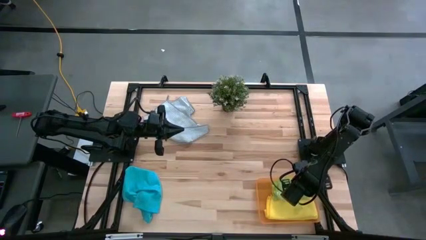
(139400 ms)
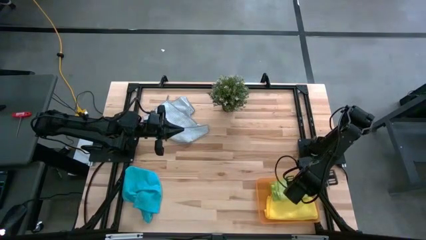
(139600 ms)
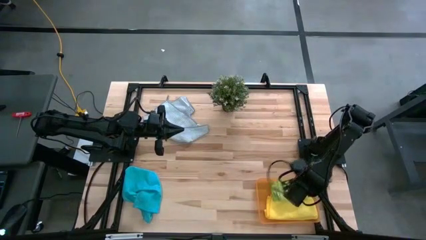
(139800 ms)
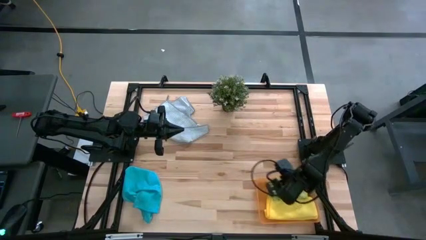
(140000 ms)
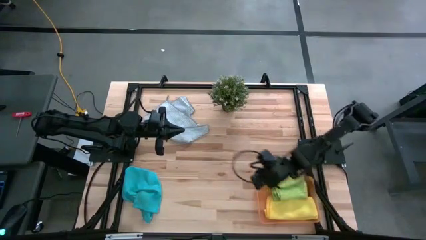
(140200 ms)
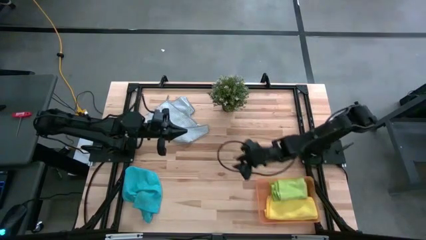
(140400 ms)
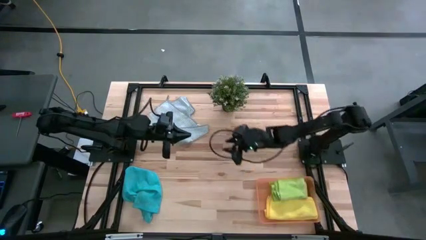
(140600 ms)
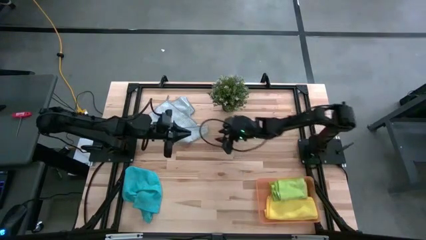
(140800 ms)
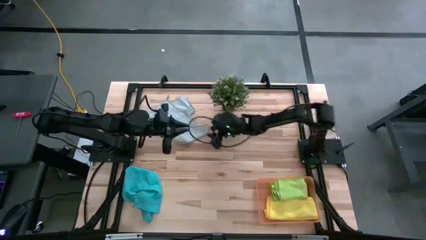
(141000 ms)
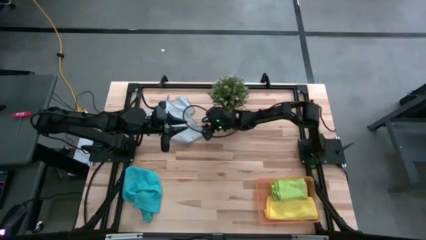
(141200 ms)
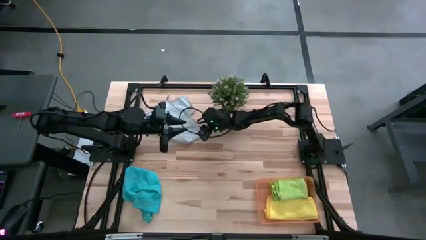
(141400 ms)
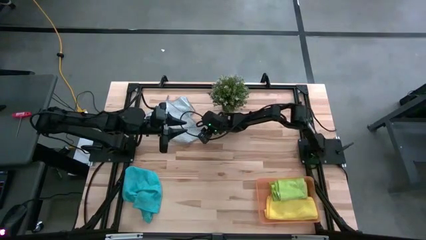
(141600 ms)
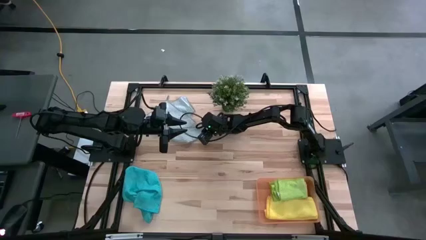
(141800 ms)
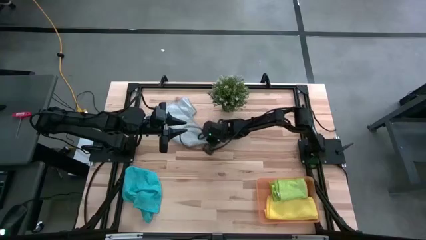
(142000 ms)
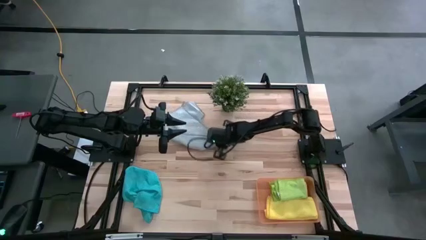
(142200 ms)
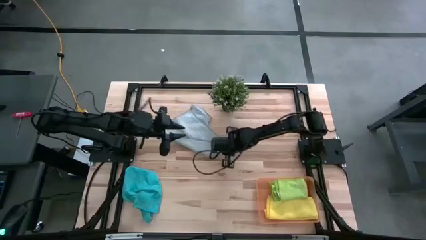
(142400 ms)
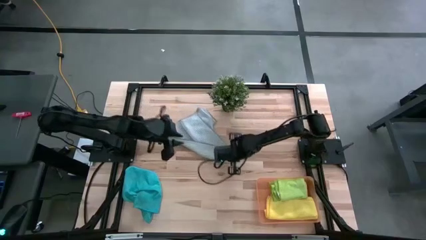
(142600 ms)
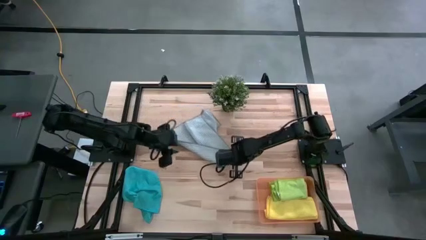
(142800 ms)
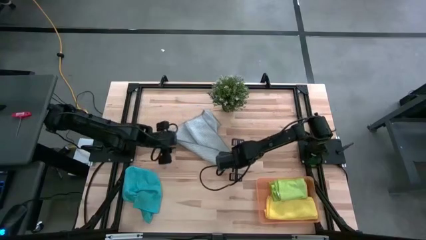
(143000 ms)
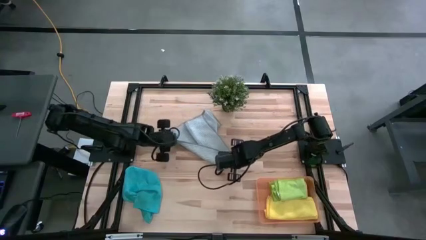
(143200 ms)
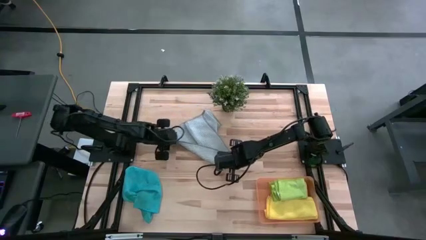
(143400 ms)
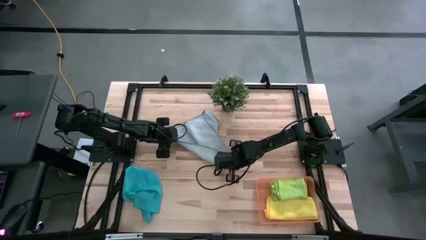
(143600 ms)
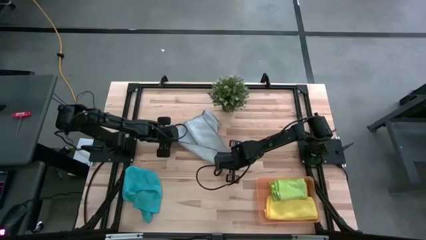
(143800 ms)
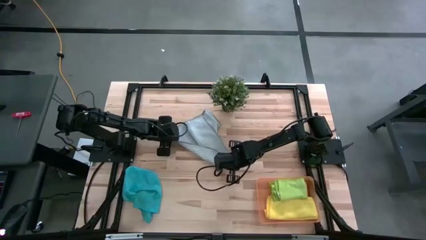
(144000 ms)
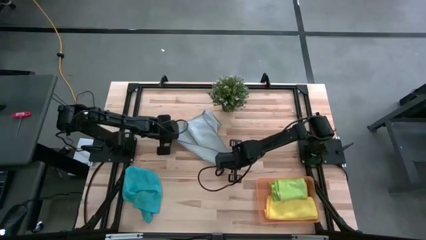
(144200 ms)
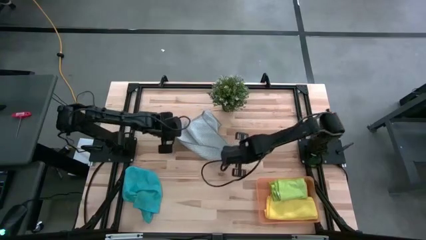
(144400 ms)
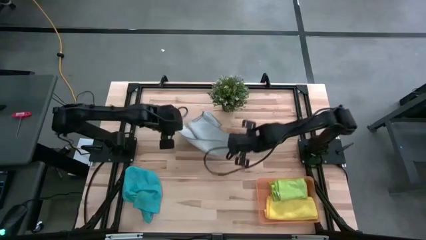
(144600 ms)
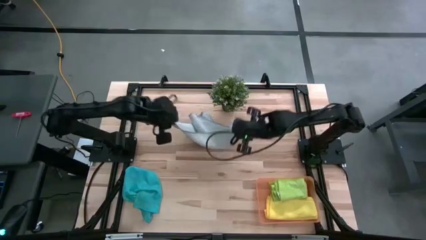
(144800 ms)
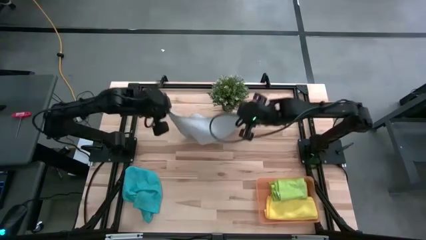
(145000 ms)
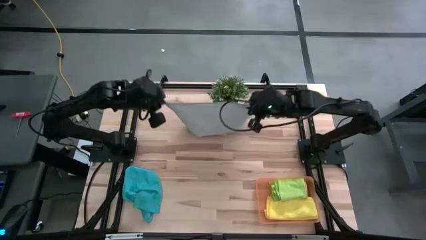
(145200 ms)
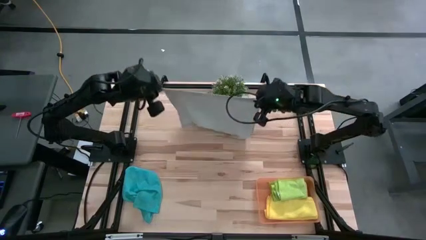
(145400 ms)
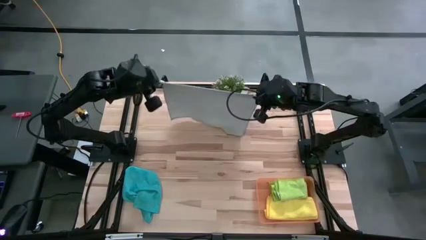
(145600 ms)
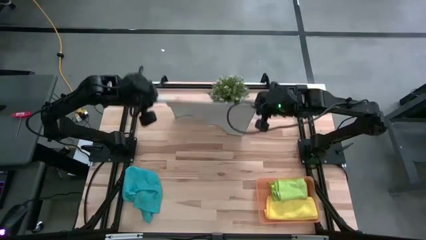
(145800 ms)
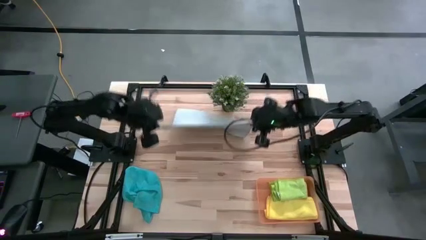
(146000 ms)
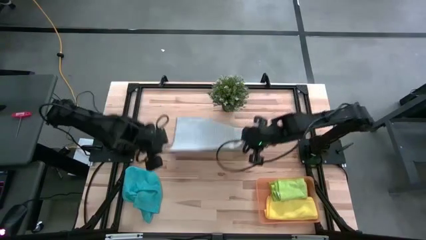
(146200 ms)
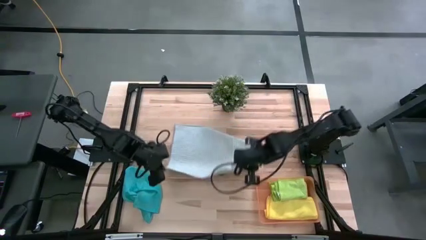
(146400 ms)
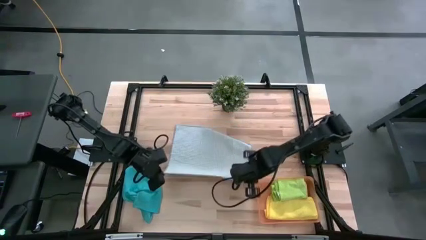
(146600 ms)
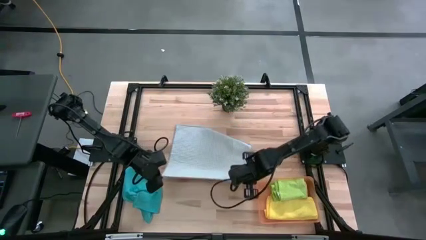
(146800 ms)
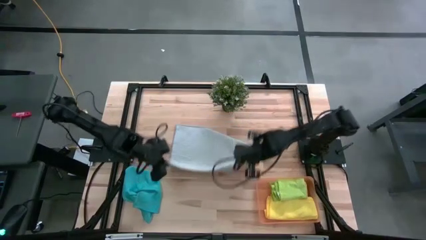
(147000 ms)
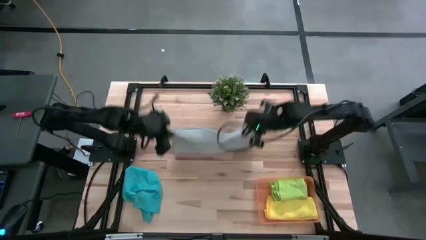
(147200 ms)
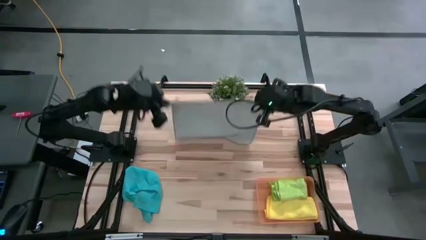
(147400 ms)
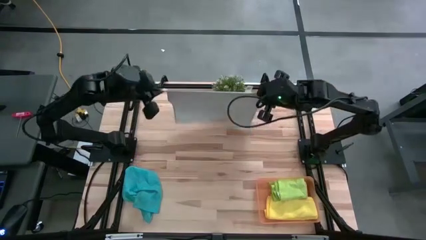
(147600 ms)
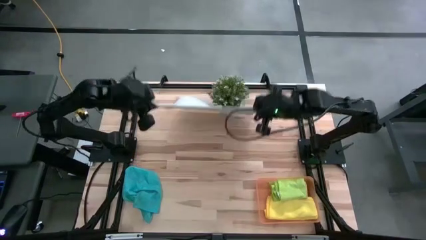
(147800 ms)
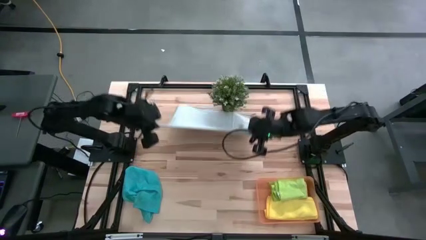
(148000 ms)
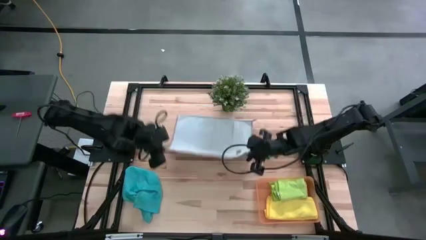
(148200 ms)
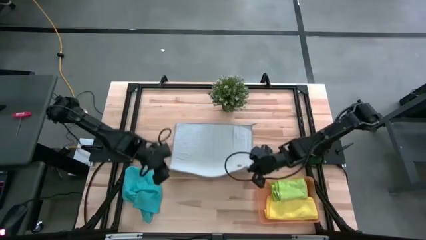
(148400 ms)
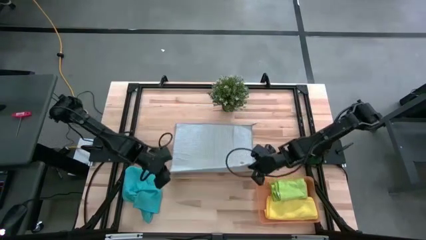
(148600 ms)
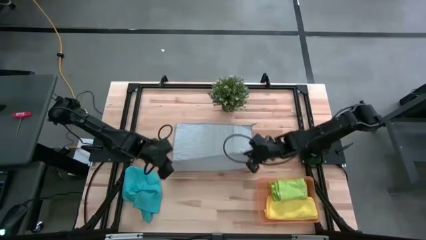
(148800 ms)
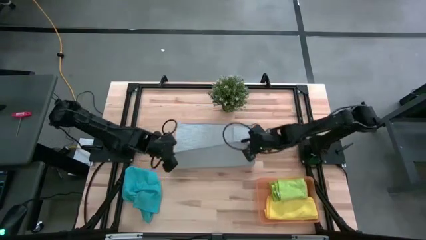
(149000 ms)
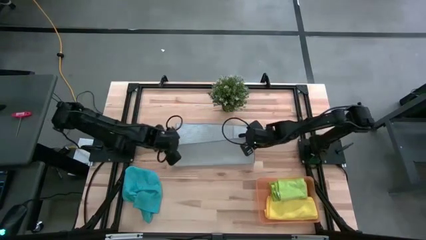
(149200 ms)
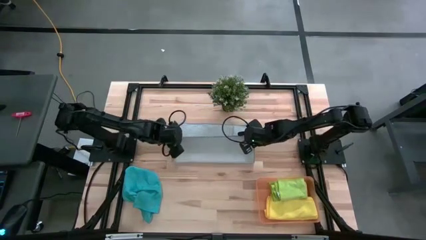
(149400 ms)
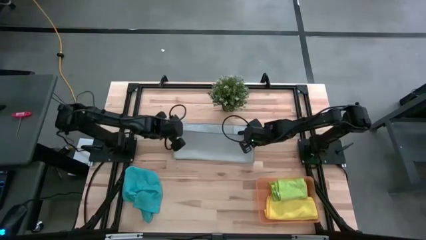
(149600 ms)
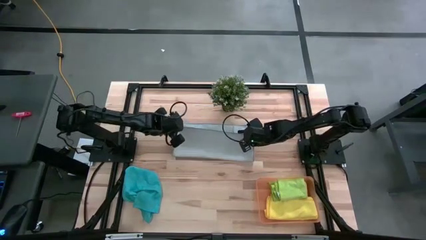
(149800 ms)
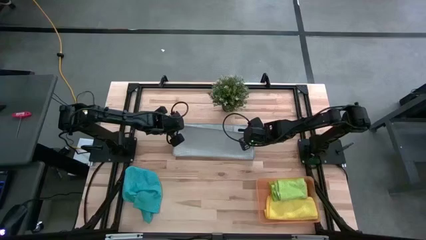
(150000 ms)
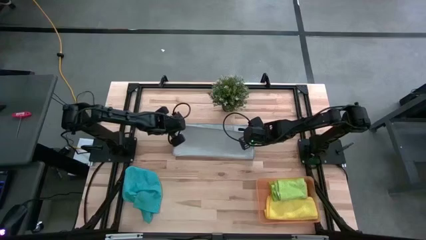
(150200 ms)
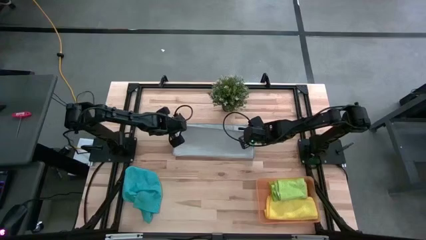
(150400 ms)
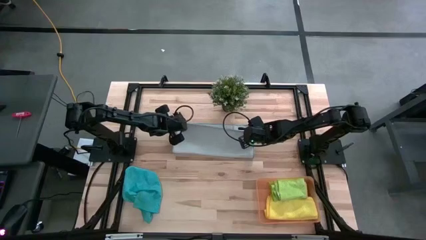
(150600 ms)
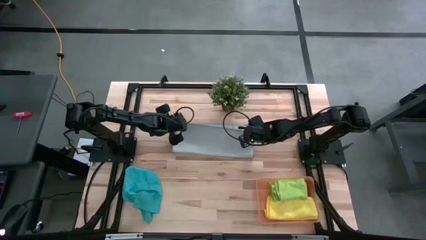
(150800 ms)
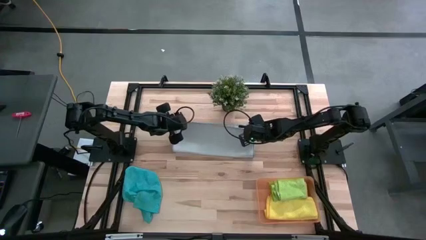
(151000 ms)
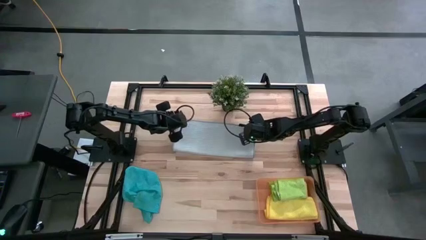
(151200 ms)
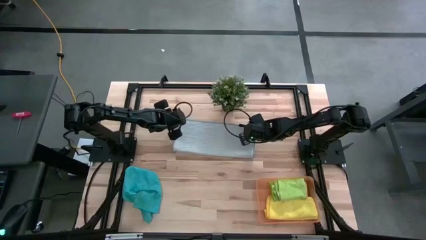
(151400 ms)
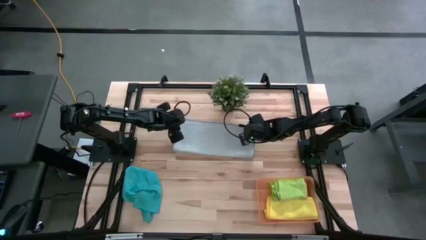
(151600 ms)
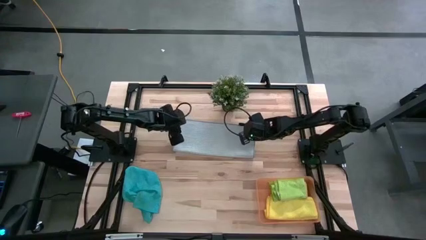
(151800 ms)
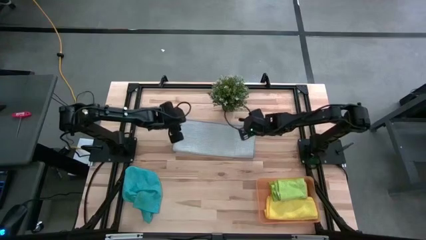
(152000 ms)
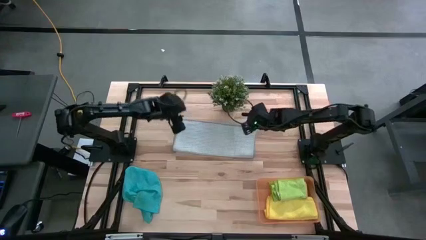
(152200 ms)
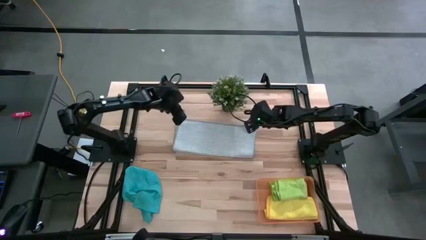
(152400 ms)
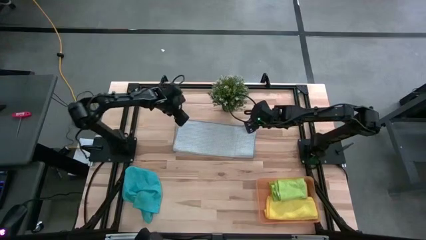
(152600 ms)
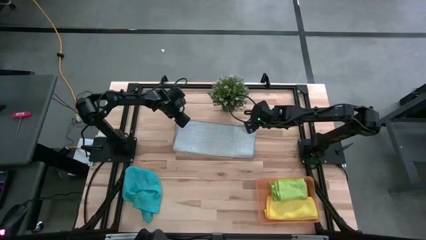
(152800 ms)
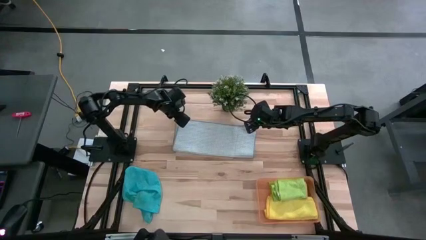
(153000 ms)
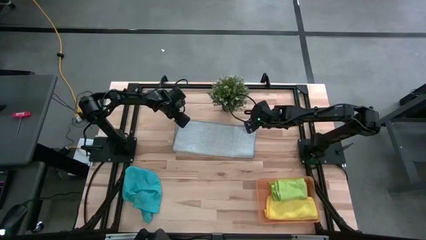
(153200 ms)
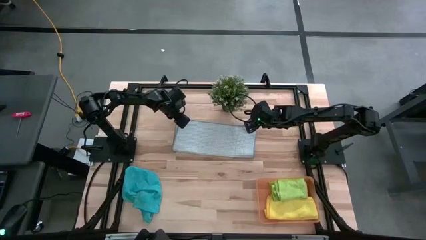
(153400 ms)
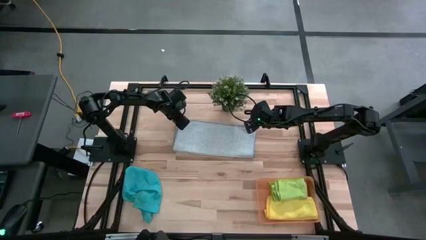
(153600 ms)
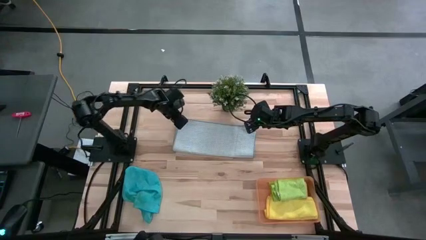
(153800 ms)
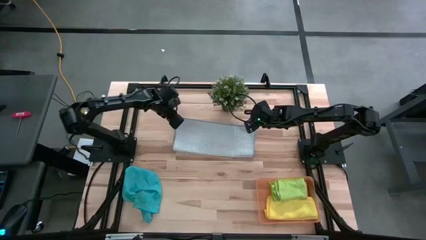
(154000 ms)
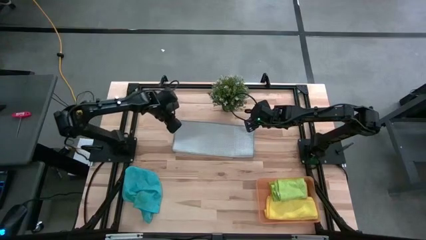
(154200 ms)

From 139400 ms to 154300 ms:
Task: Fold microfiber towels
Fold the gray microfiber towel

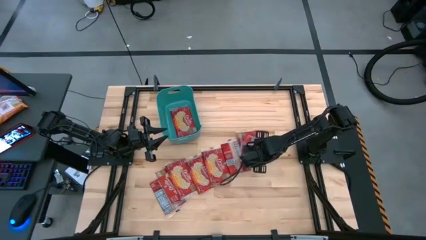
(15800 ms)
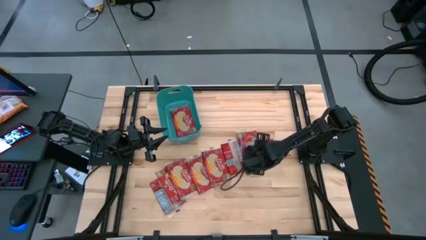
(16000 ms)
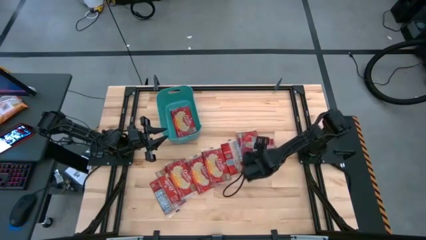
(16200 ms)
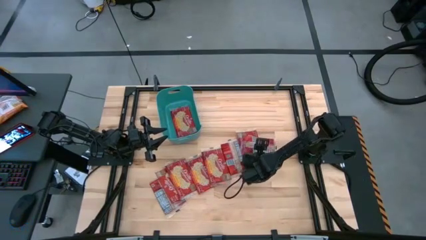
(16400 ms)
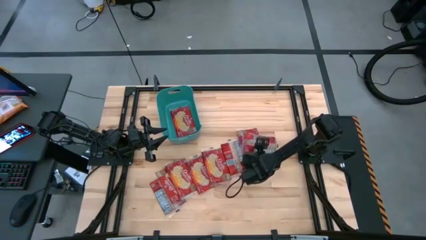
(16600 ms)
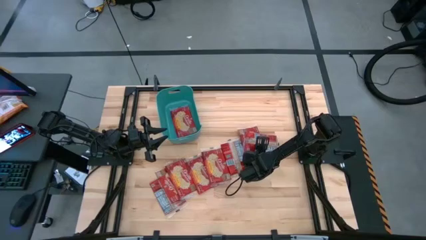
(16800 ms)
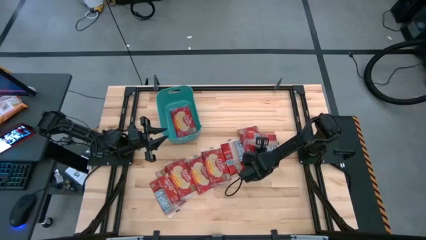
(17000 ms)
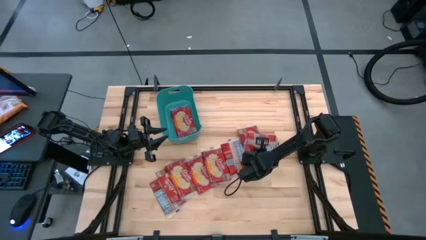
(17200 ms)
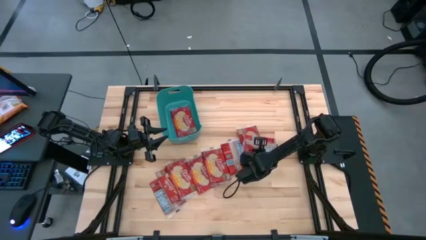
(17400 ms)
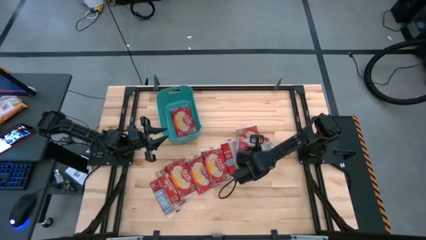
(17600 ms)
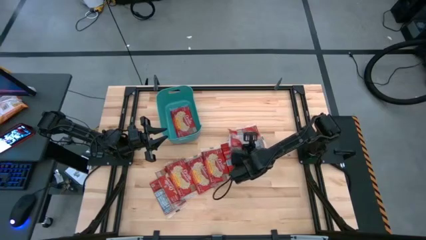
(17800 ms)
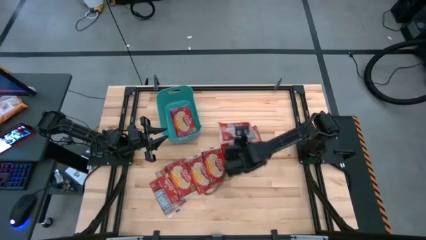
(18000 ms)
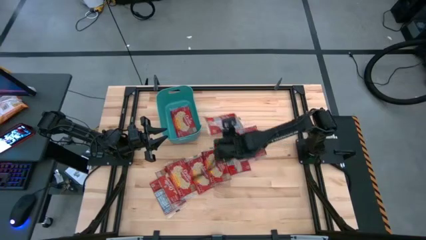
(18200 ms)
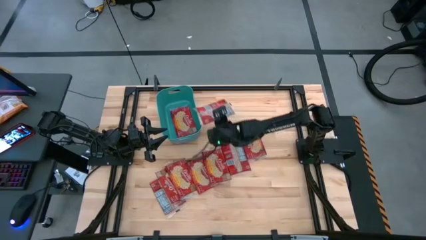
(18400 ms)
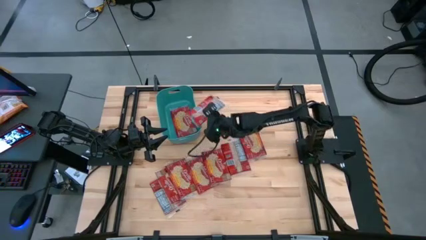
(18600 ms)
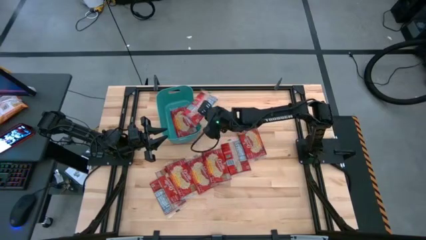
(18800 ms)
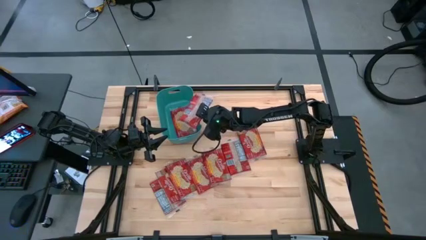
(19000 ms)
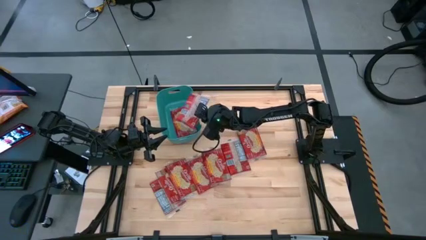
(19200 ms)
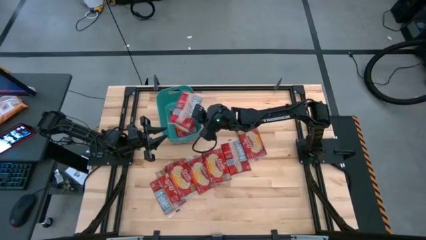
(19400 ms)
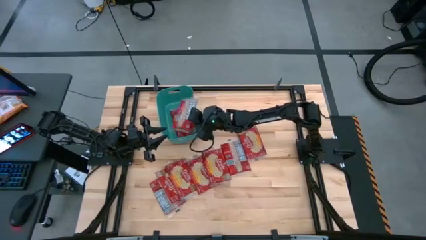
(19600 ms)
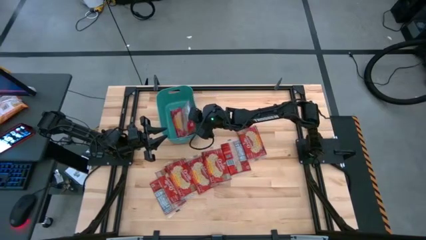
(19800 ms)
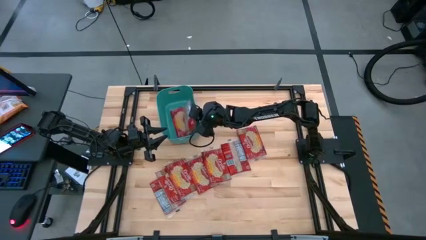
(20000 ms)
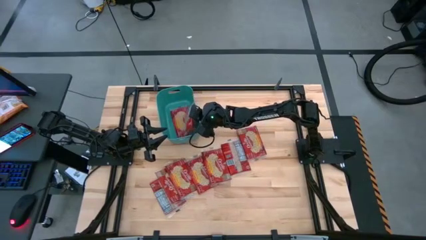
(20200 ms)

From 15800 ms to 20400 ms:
Task: Sort popcorn bags into baskets
Put the red popcorn bag into the green bin
